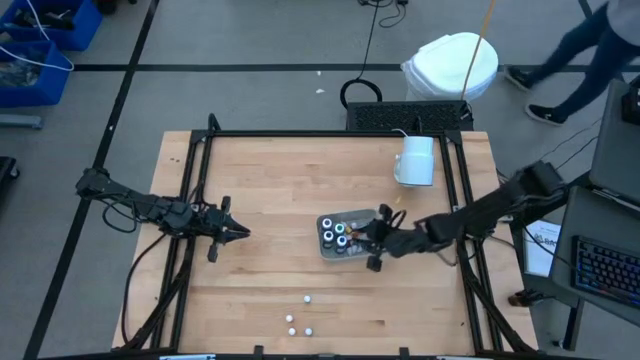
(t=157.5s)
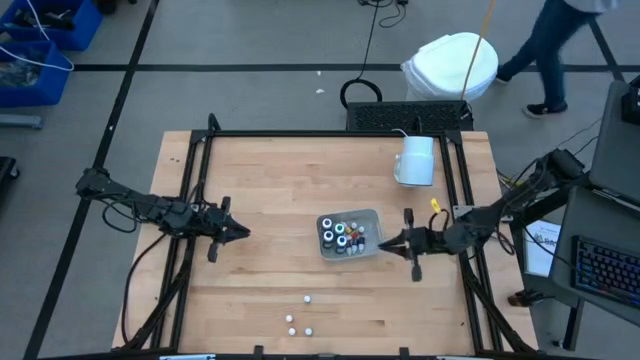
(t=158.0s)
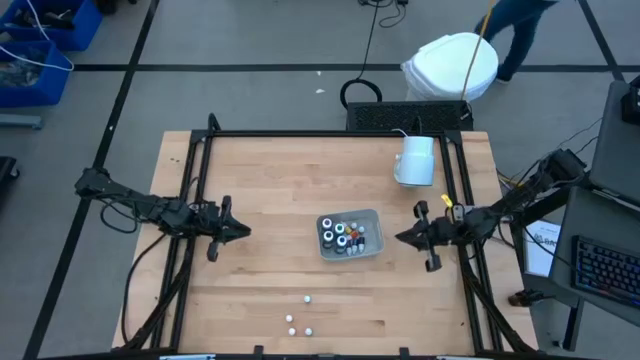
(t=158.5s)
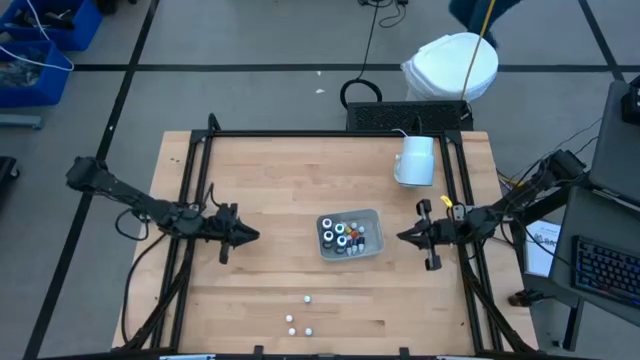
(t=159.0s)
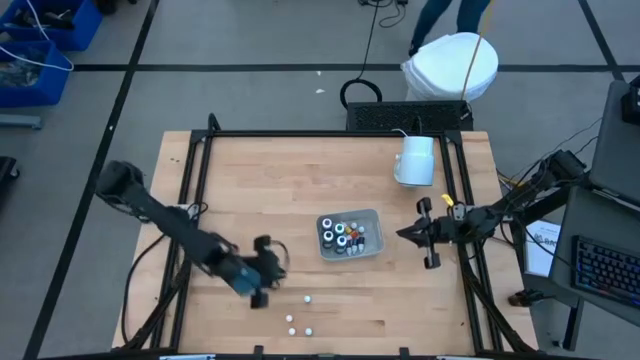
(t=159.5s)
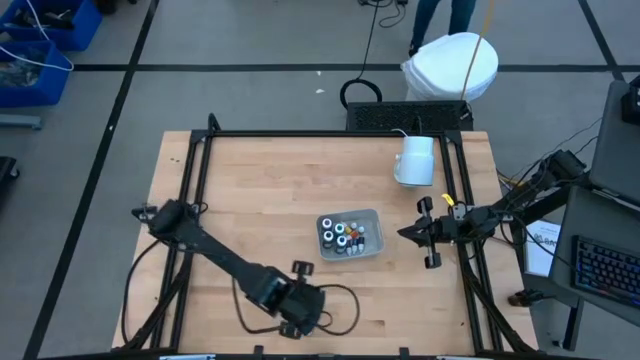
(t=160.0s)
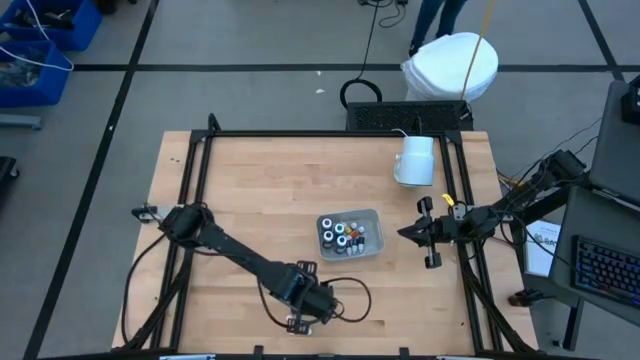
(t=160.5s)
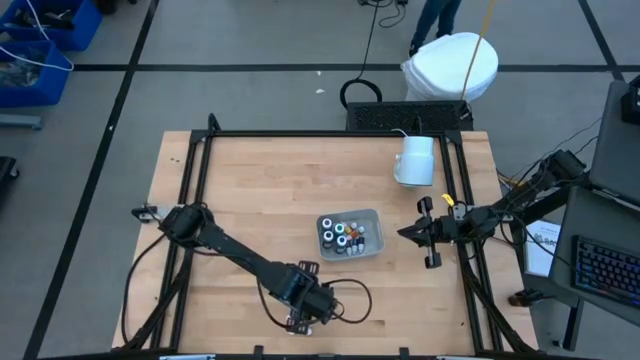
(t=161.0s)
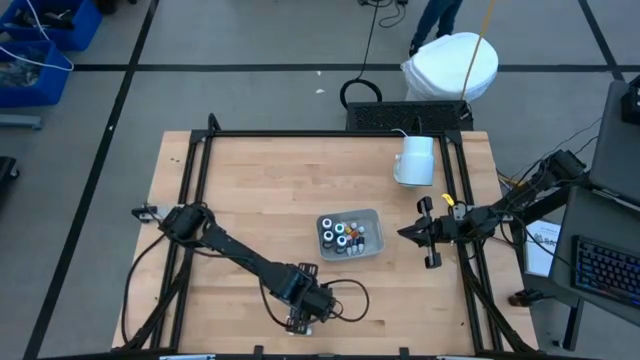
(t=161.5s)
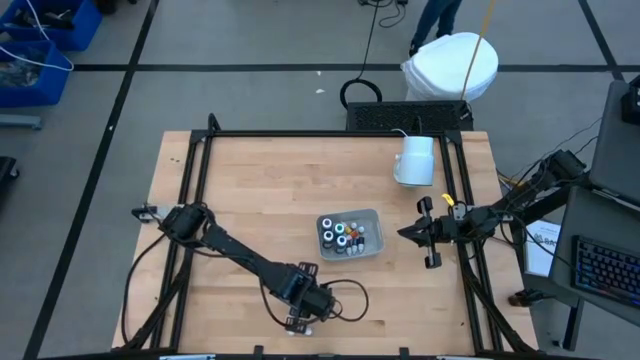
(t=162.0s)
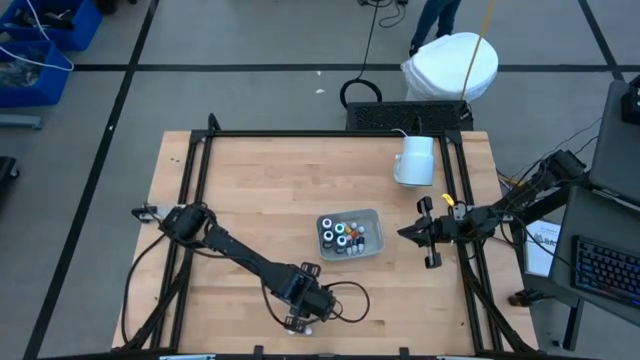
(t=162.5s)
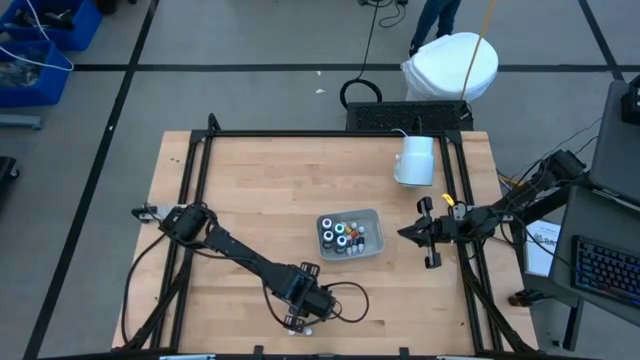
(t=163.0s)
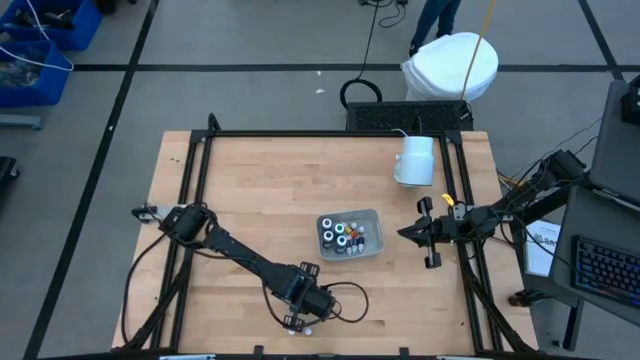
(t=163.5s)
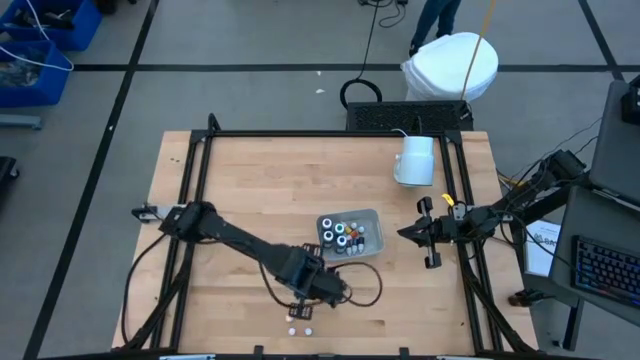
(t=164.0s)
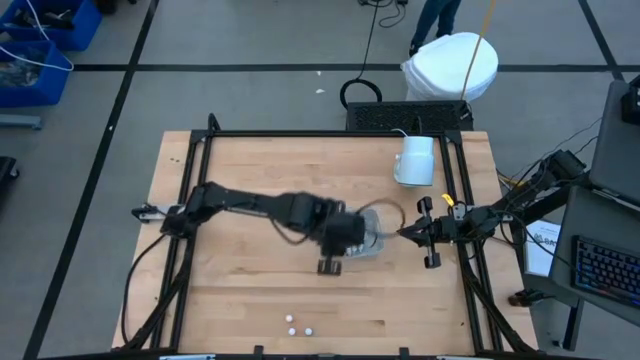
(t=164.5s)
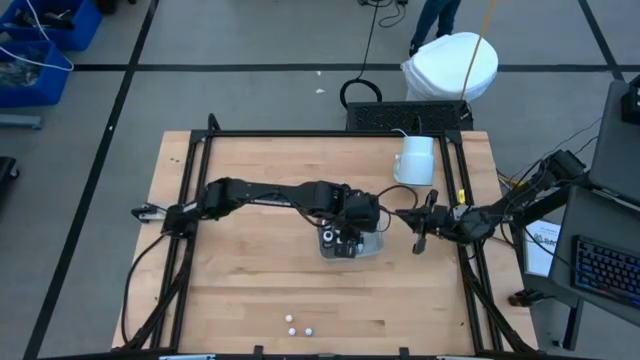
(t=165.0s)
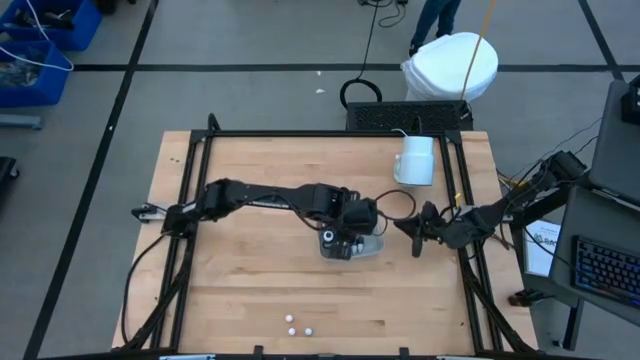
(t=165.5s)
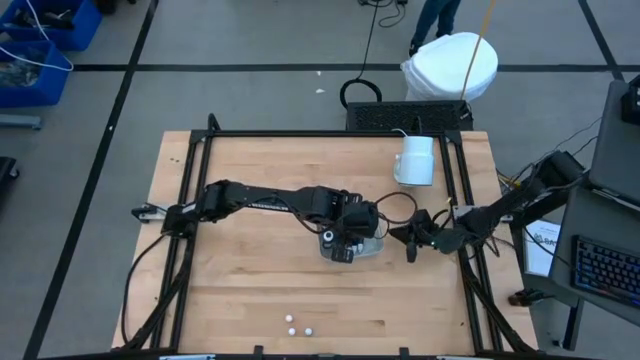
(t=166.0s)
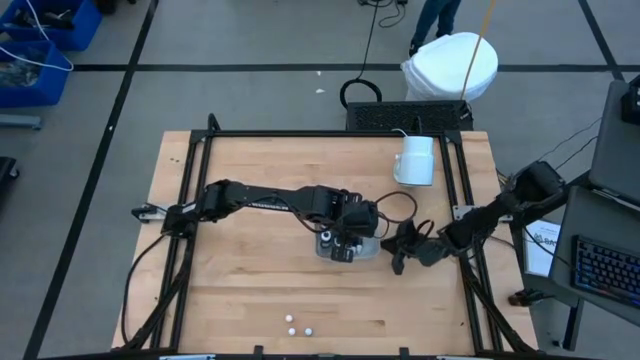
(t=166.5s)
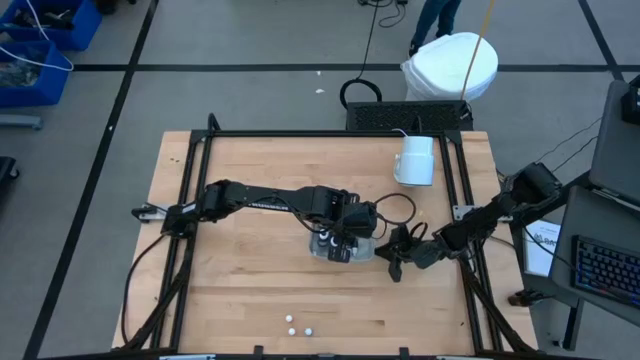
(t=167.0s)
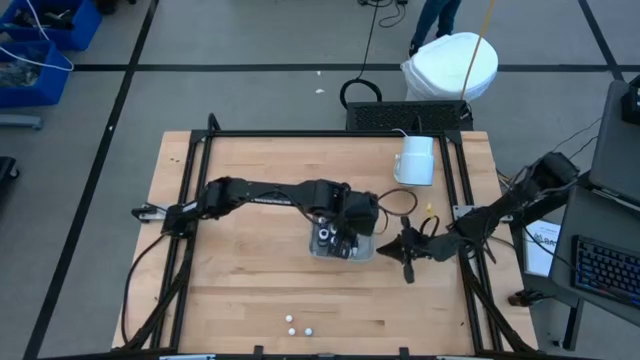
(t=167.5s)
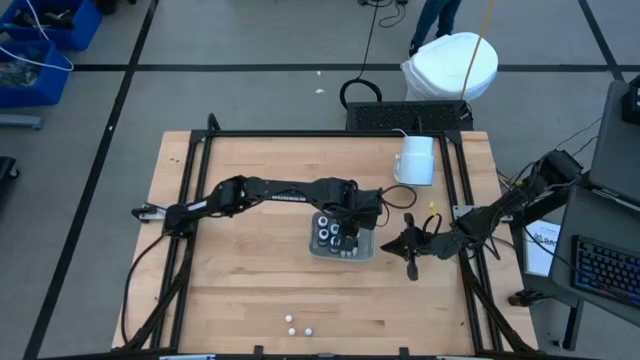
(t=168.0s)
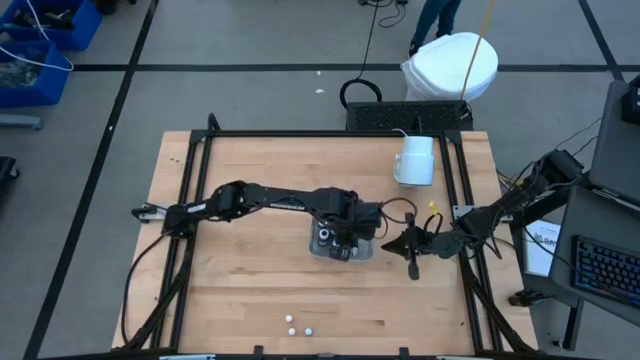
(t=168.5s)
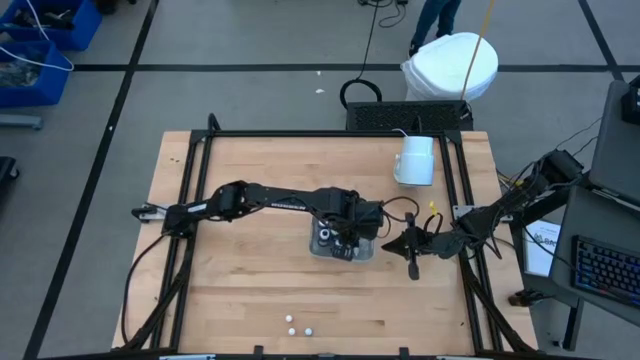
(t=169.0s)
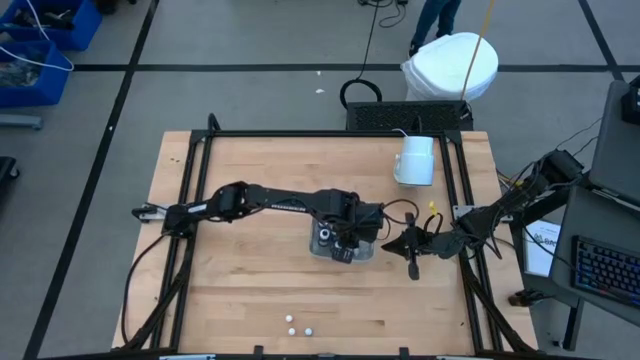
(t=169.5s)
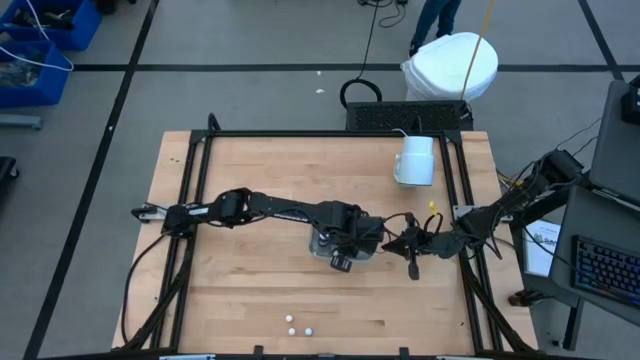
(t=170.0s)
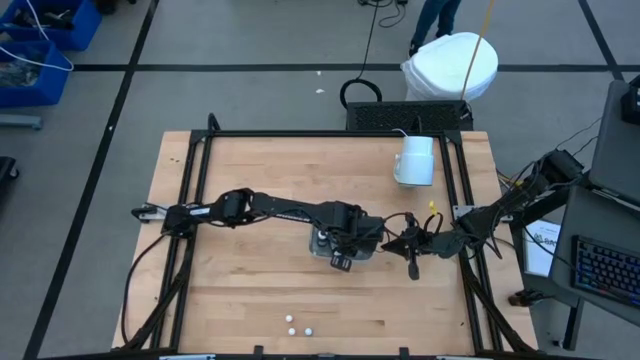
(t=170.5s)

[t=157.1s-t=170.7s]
Task: Pick & Place food coloring
Put the small green food coloring into the gray bin

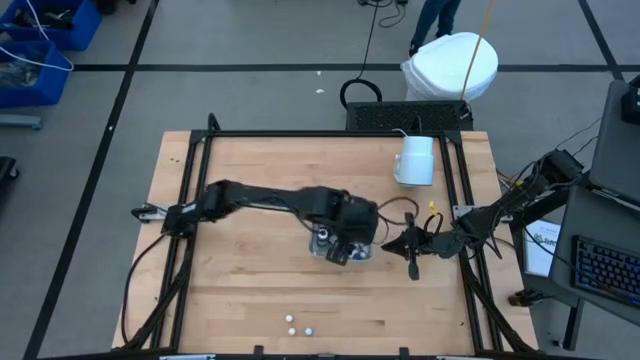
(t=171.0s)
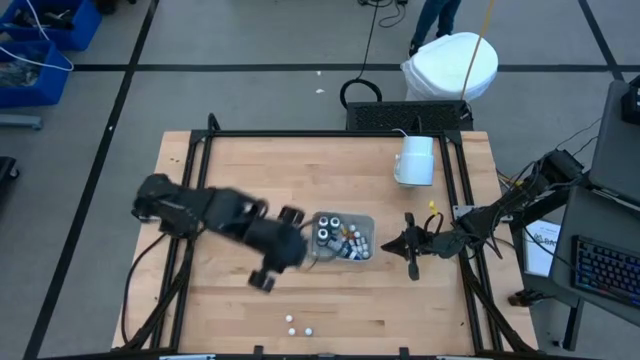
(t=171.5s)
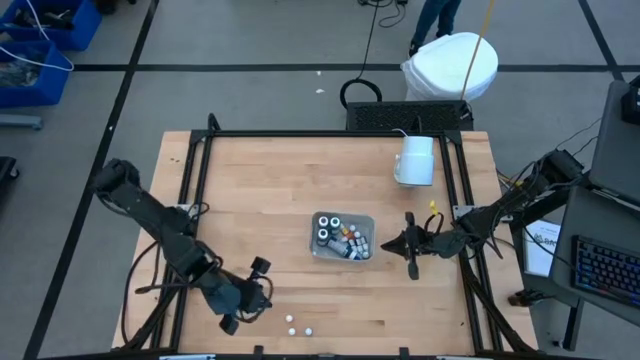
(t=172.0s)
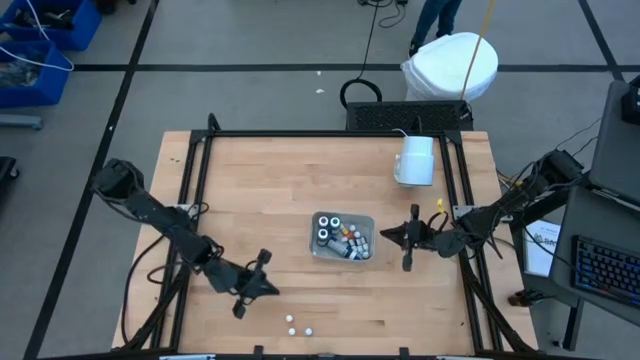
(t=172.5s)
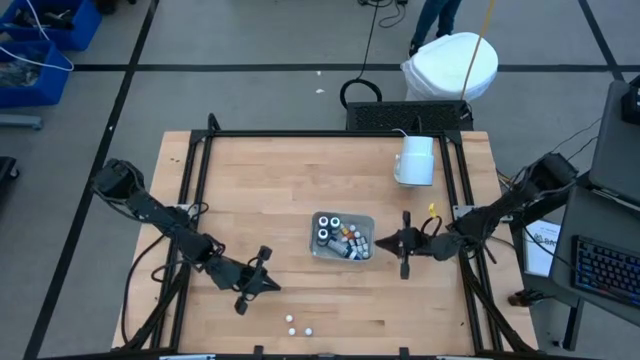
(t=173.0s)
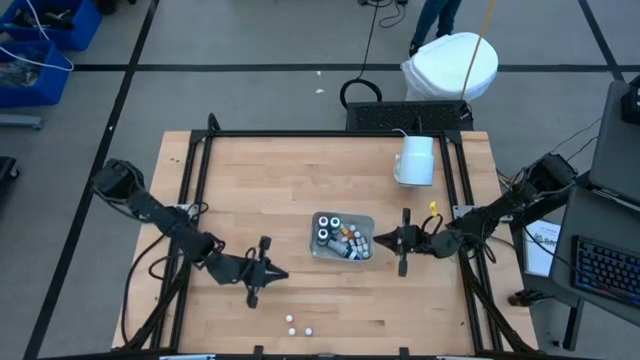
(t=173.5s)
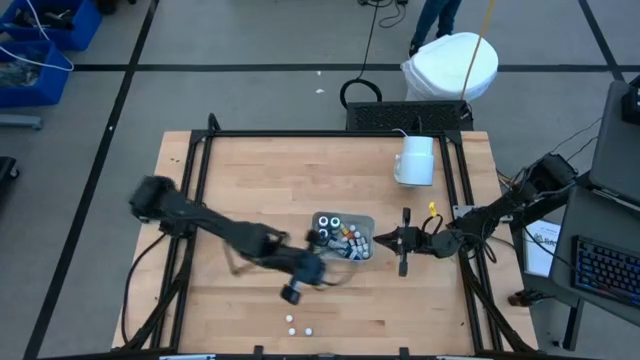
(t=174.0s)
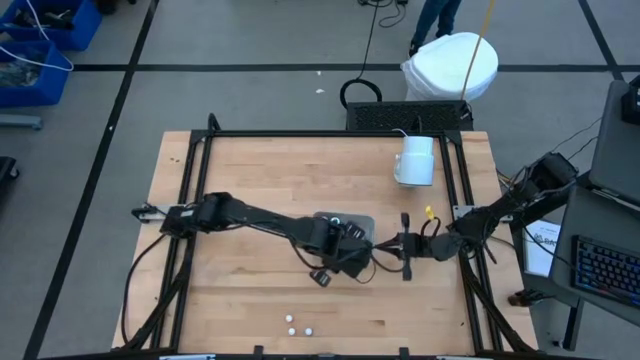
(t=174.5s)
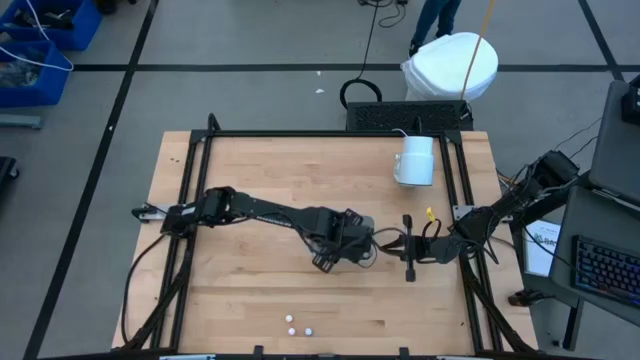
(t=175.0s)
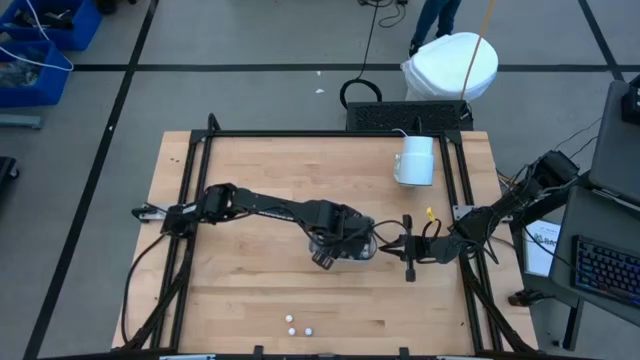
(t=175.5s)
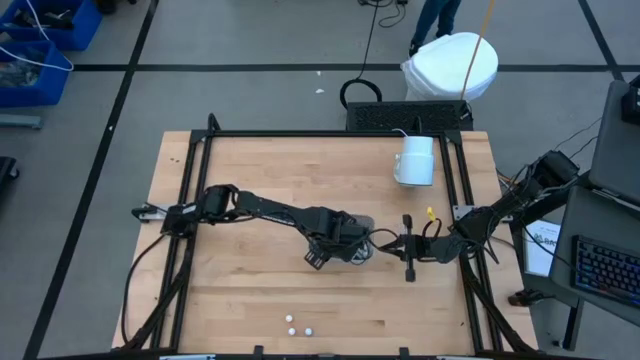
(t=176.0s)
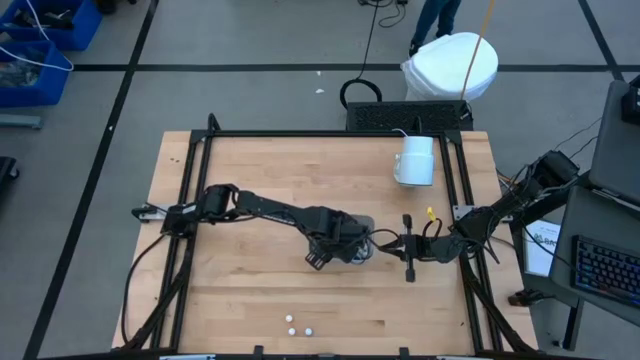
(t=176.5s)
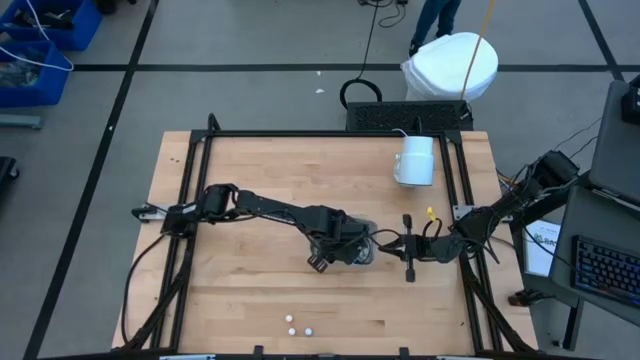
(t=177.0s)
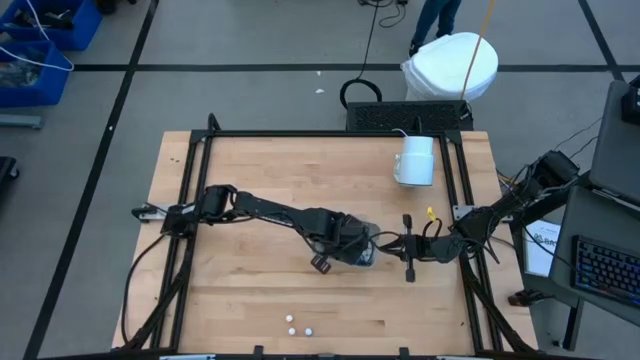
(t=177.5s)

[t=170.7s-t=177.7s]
Adjust the big blue food coloring in the gray bin
